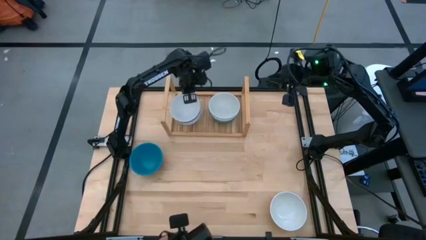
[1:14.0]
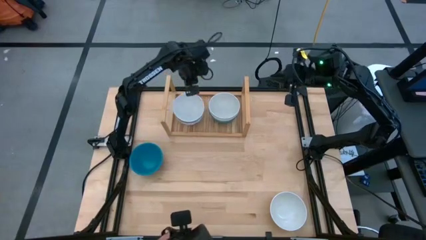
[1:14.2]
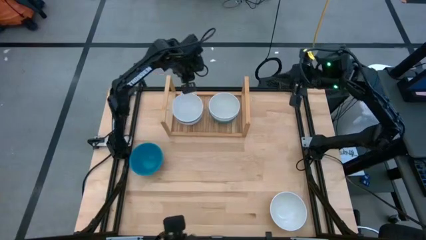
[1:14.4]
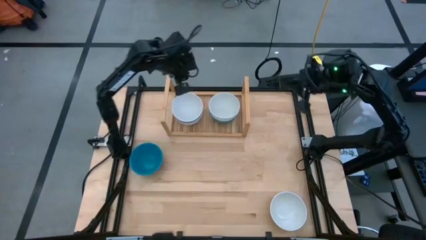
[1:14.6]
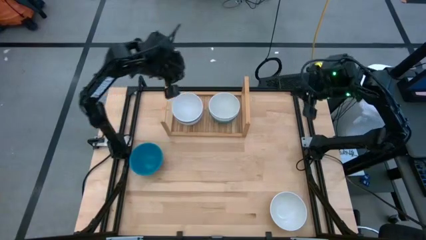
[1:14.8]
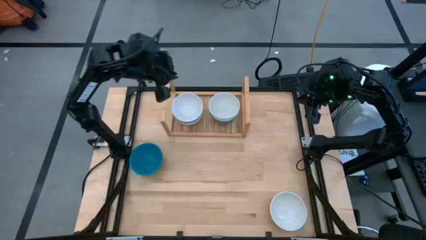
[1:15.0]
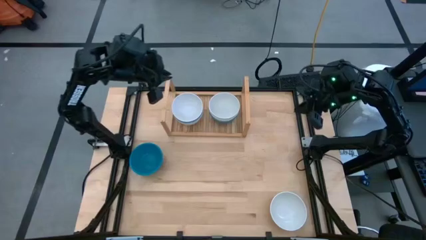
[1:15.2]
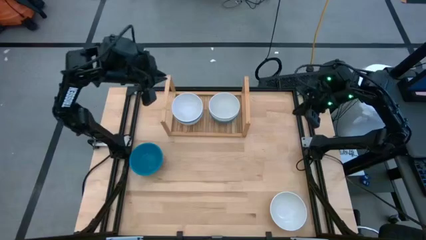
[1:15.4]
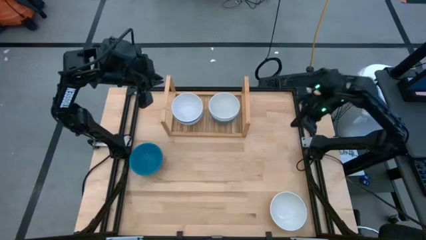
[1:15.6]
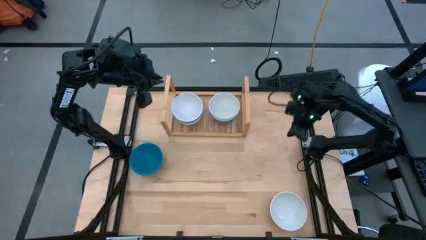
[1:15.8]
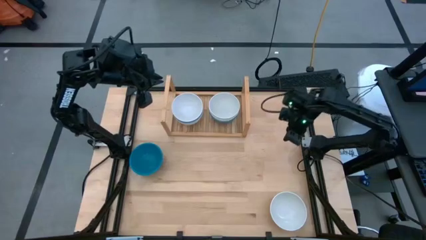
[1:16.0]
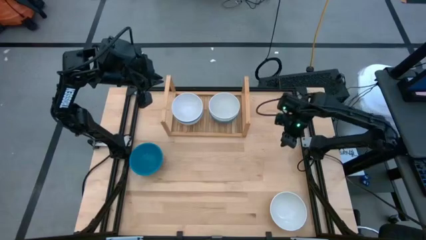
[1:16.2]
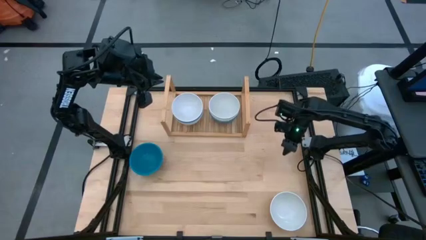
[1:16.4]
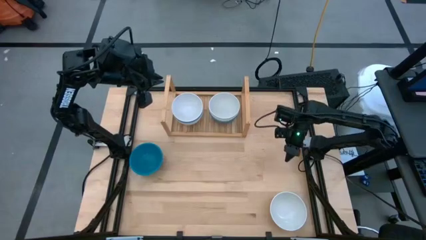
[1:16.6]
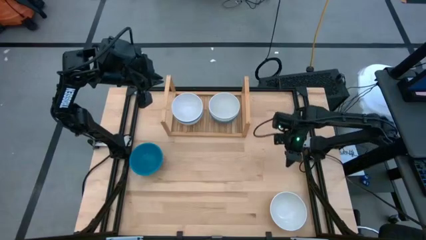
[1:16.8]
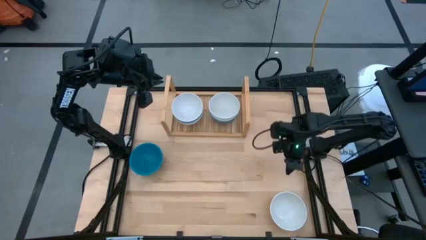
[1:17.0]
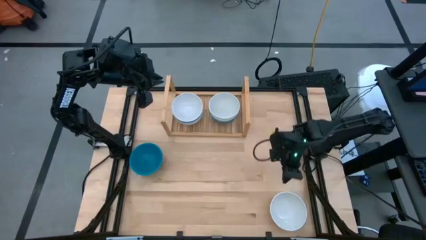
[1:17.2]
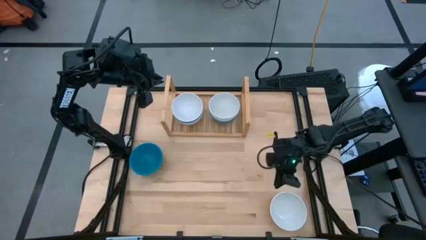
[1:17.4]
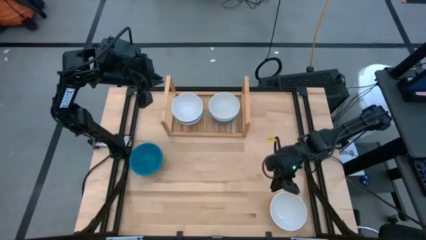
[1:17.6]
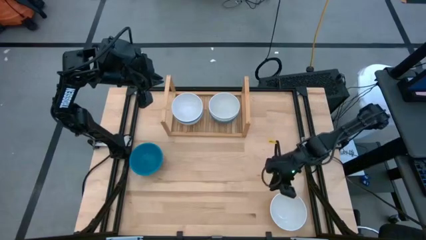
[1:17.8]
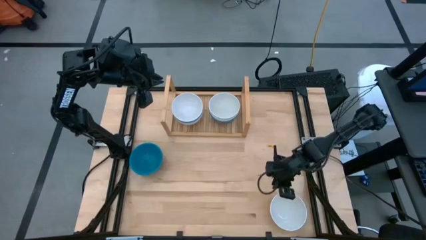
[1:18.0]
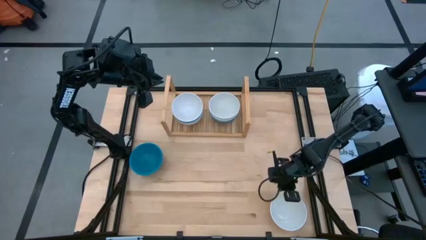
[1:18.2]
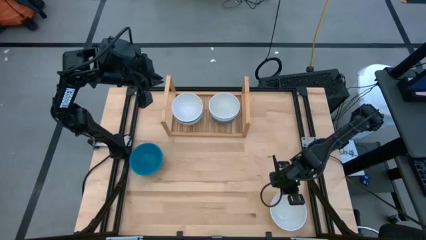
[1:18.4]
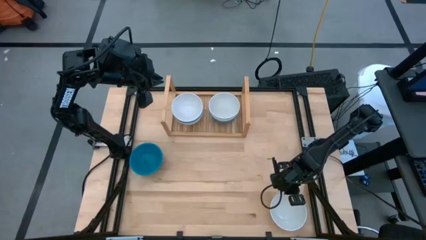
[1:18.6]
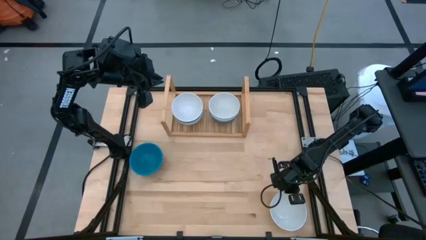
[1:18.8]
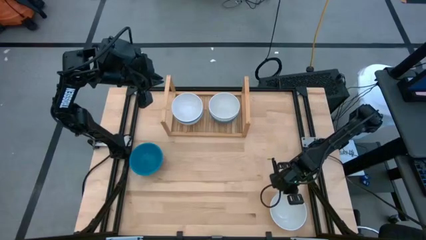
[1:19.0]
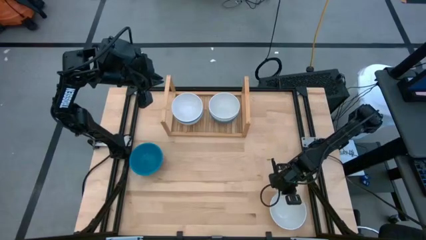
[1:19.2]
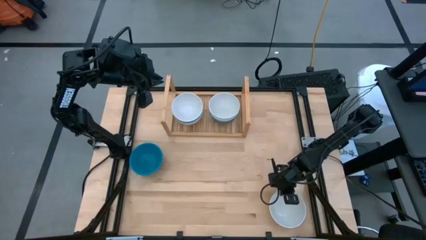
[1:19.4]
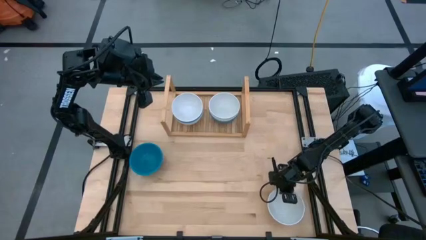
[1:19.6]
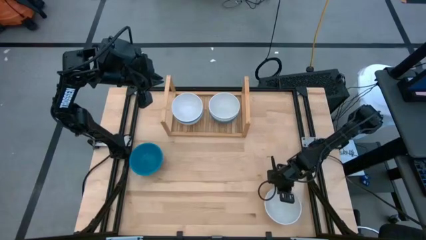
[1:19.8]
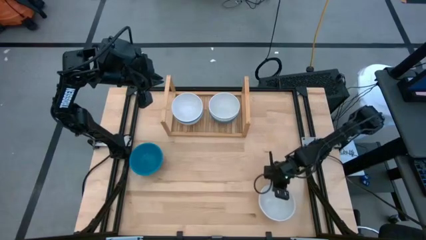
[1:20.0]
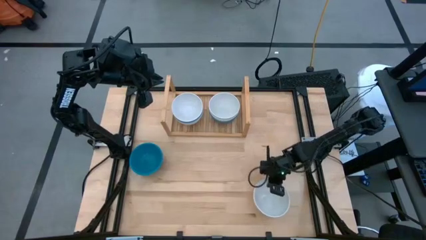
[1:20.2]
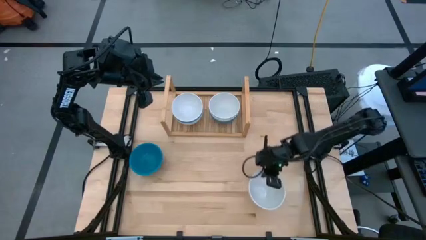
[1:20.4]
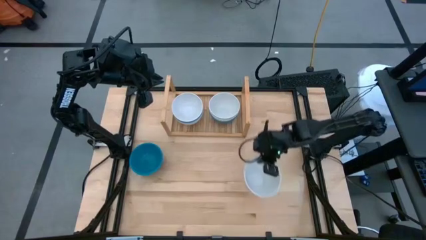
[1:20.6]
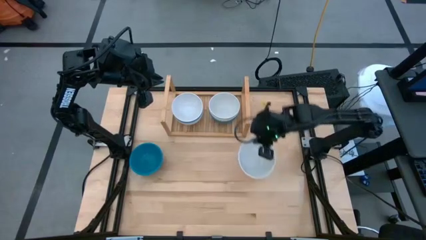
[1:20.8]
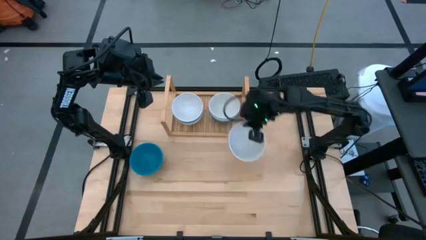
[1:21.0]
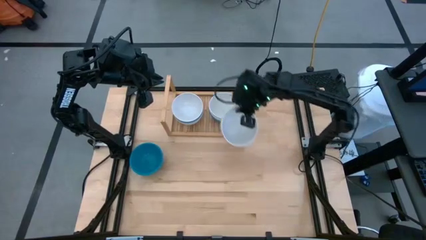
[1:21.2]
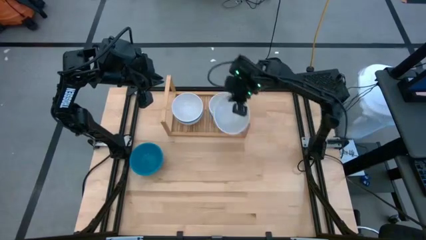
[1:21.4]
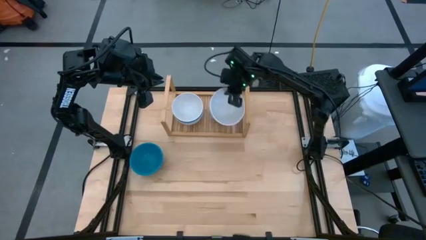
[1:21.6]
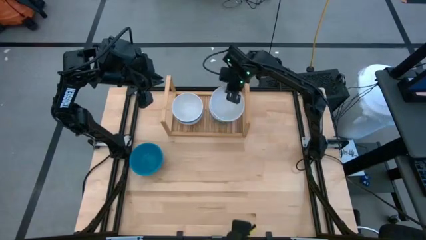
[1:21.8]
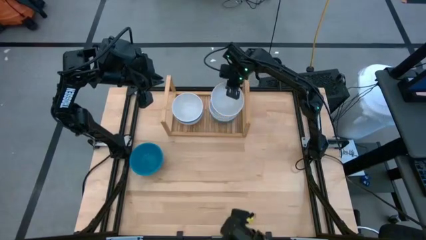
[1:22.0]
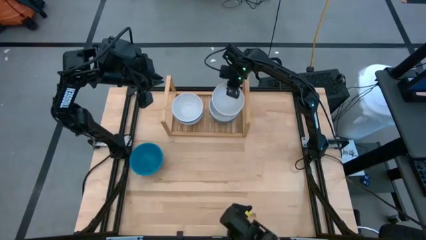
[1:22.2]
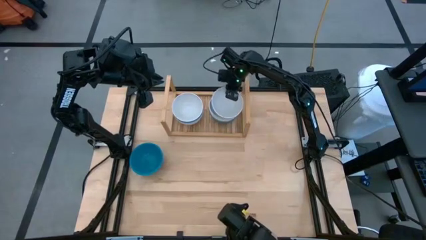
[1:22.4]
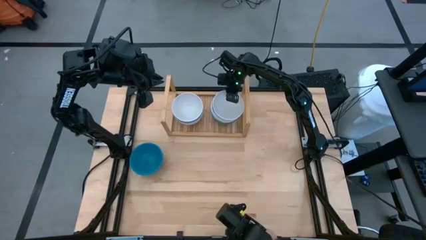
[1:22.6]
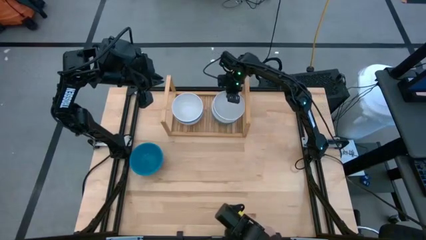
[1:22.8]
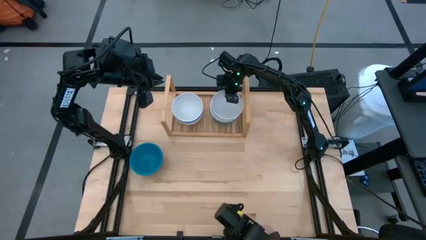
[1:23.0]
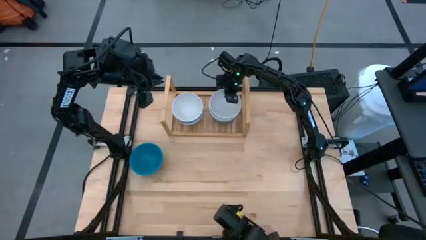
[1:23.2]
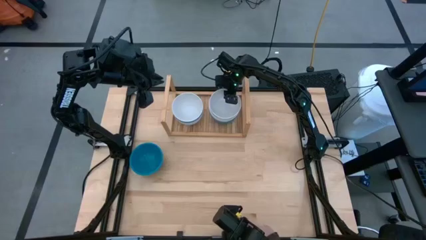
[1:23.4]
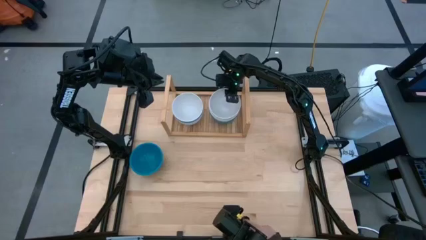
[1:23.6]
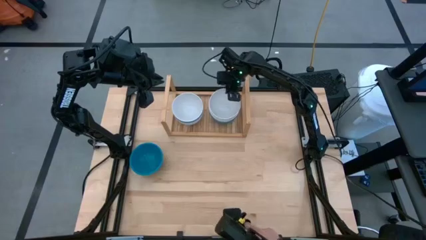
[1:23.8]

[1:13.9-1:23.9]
Task: Place and stack bowls onto a shelf
Stack the white bowl on the right white bowl on the shelf

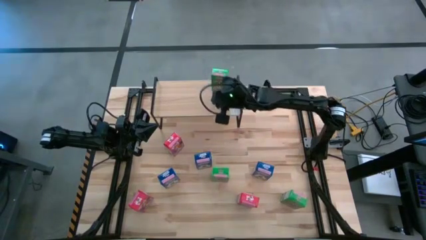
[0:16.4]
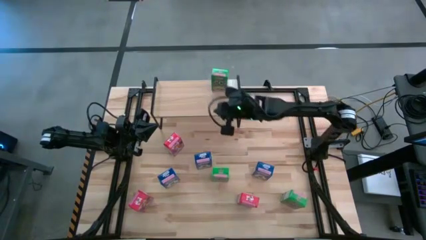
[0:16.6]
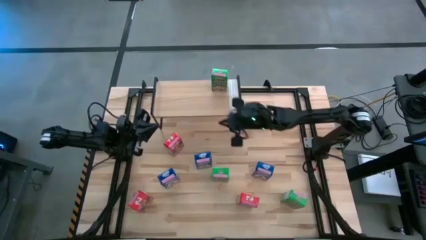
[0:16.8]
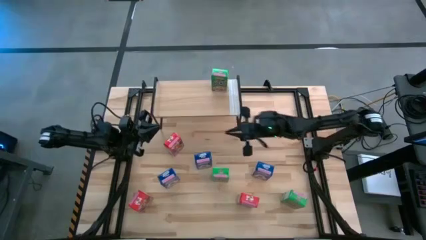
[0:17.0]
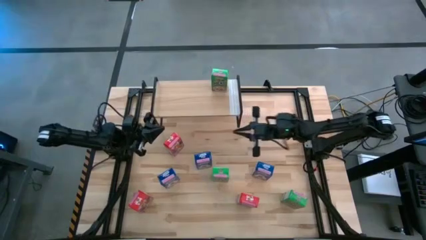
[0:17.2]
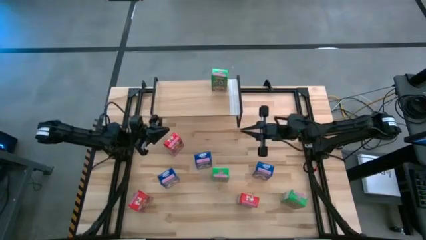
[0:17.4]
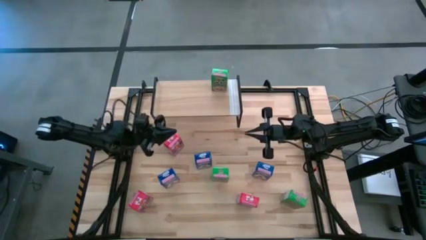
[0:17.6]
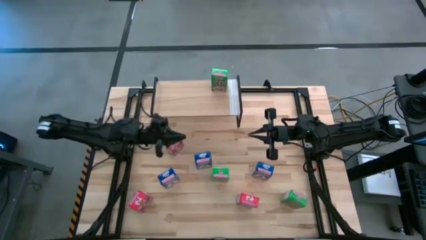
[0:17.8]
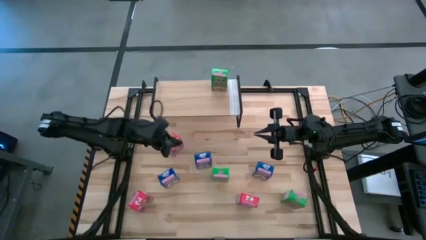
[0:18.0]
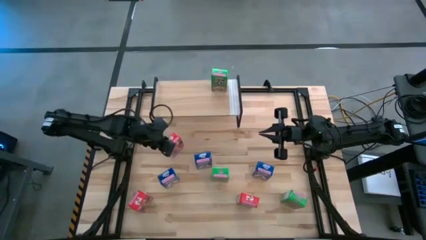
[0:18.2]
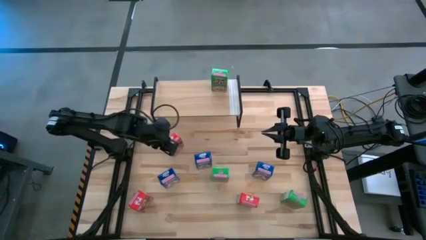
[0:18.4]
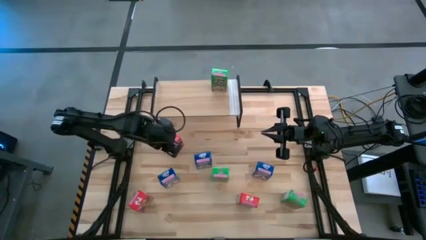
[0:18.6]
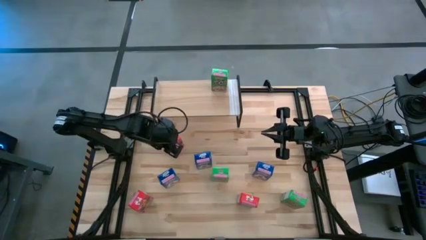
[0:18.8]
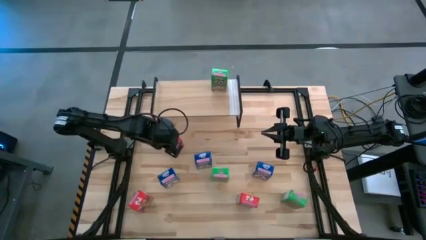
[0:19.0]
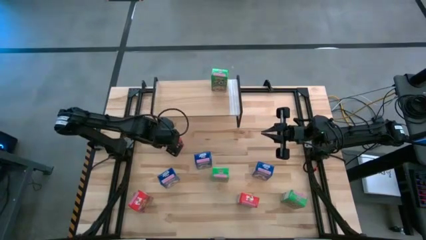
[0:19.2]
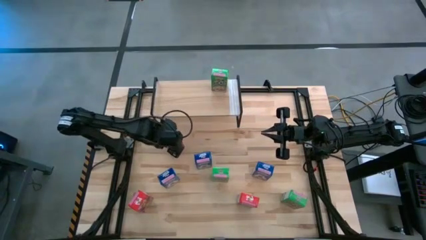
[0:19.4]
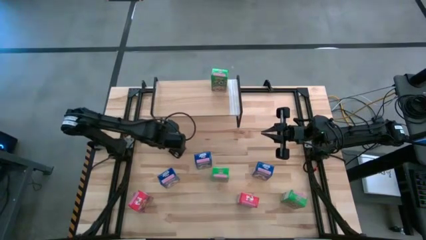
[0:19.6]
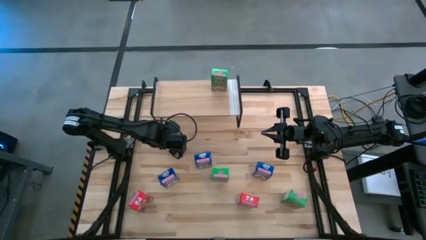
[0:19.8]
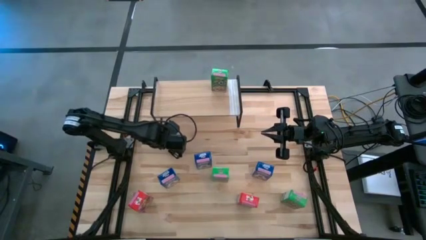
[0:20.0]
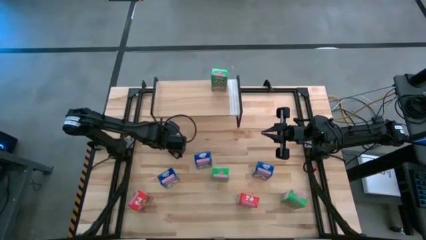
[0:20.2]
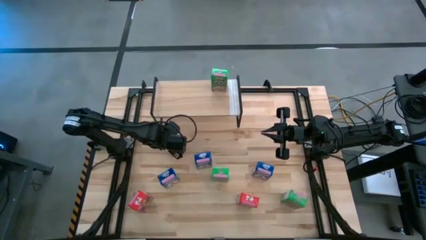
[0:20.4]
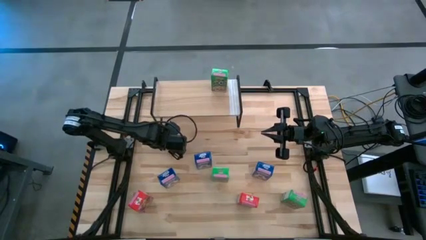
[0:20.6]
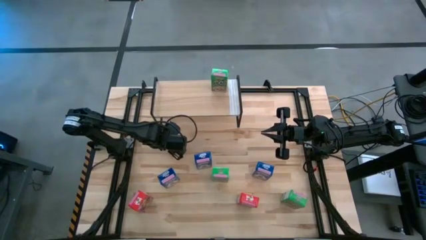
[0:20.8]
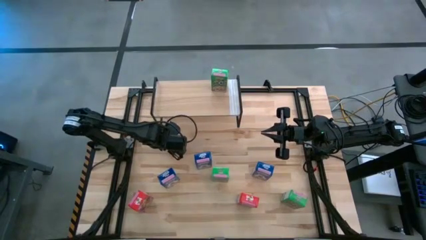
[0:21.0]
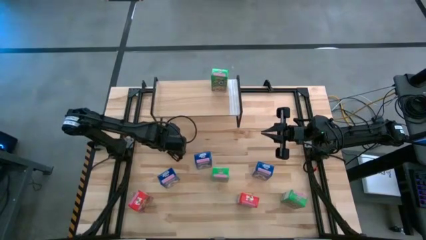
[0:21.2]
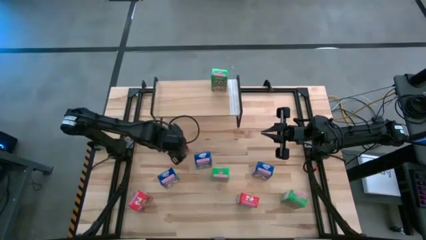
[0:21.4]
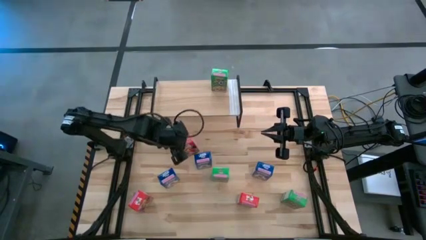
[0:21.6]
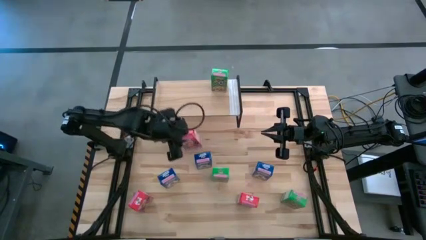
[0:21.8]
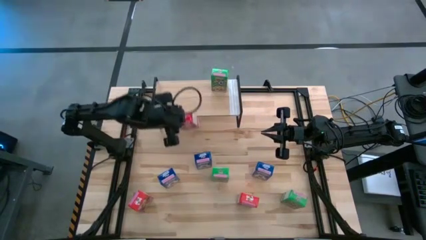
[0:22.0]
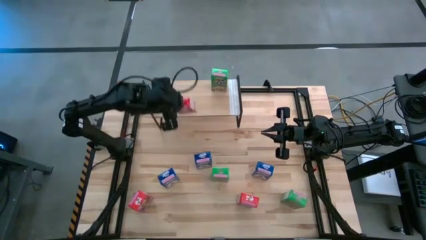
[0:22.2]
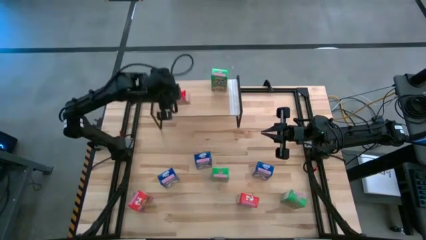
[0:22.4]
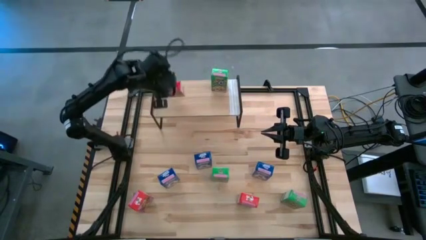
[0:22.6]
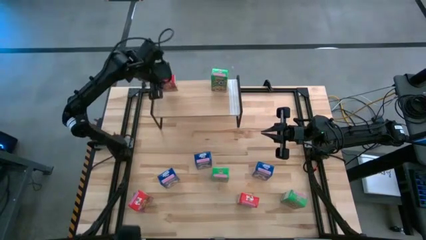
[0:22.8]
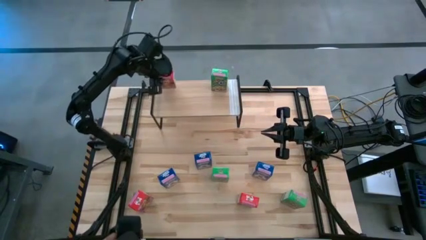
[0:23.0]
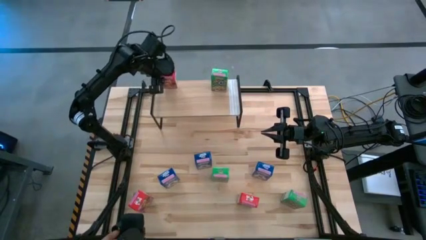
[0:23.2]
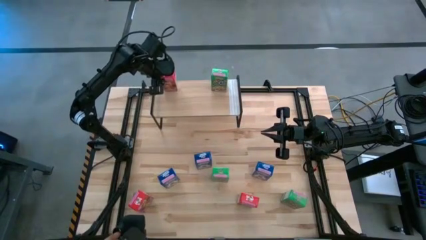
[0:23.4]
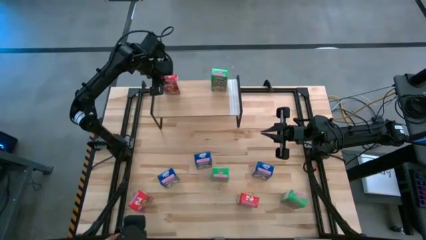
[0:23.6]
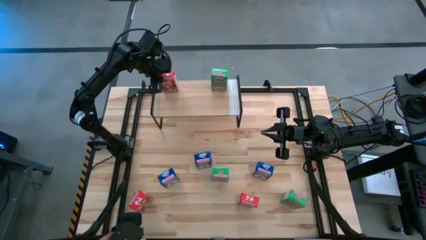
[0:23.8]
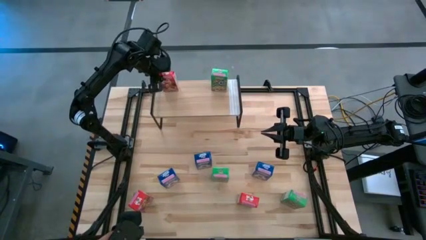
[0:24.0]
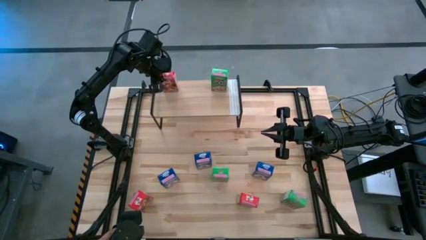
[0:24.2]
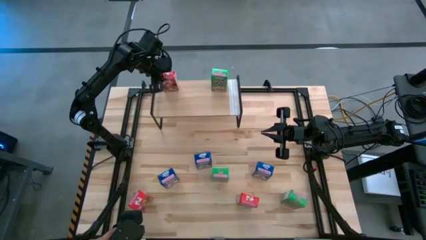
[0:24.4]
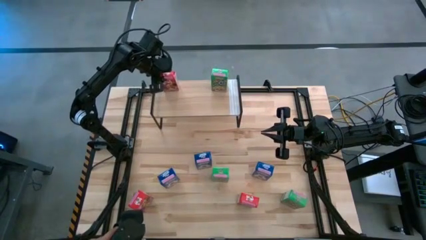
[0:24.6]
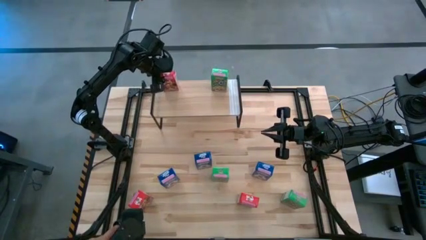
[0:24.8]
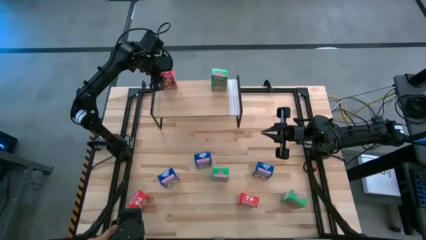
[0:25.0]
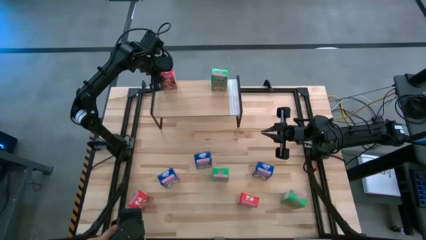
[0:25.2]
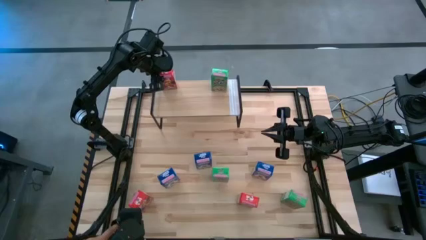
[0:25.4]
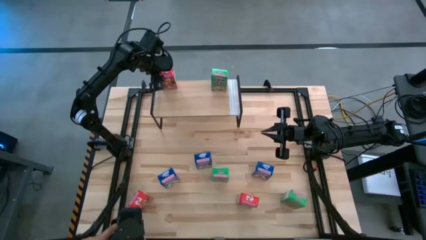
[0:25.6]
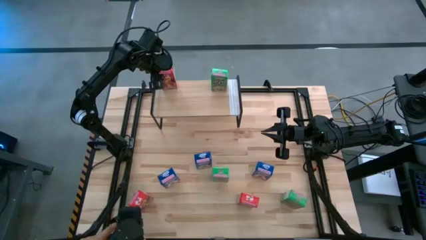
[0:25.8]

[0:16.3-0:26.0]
Task: Stack cereal on shelf
Put the top red cereal box on the shelf
